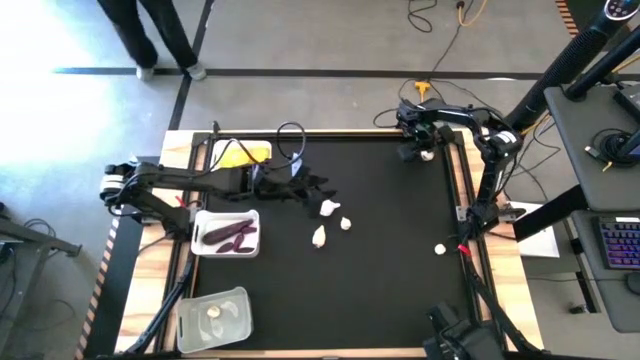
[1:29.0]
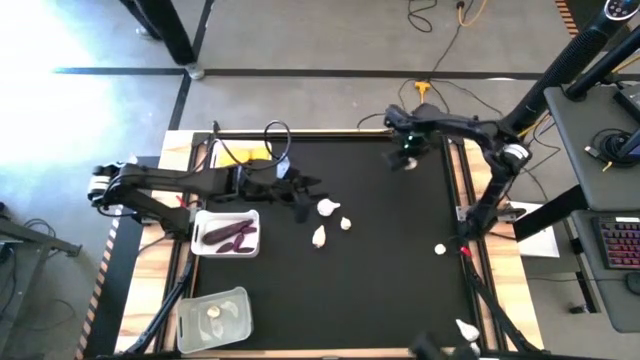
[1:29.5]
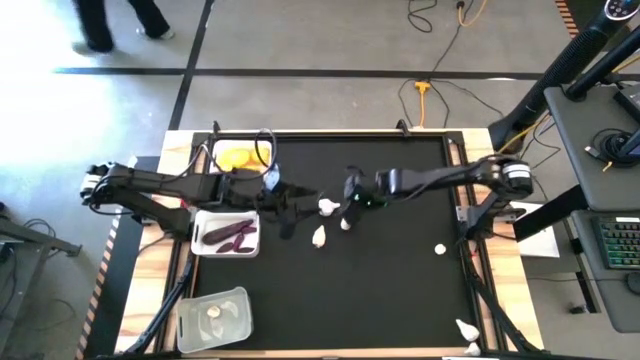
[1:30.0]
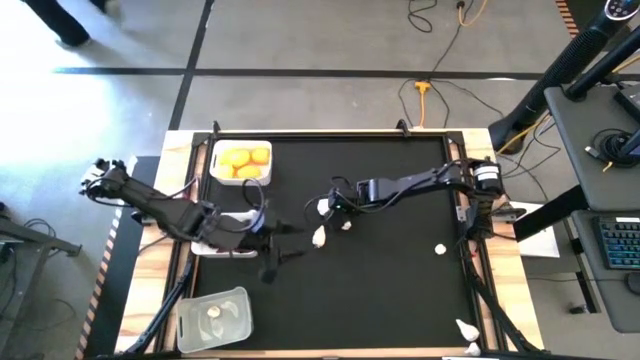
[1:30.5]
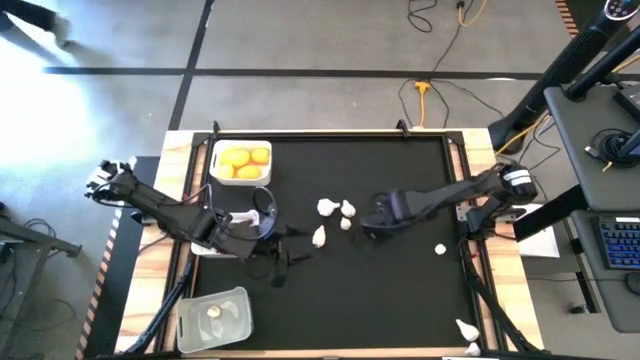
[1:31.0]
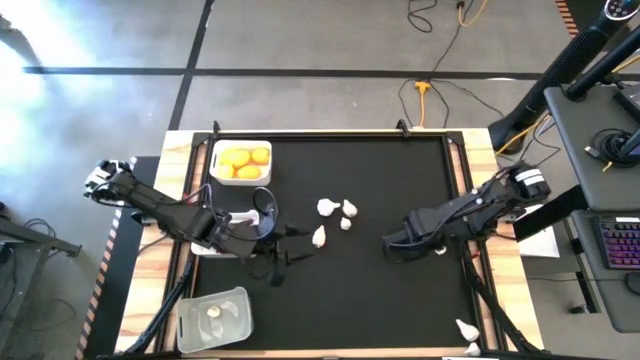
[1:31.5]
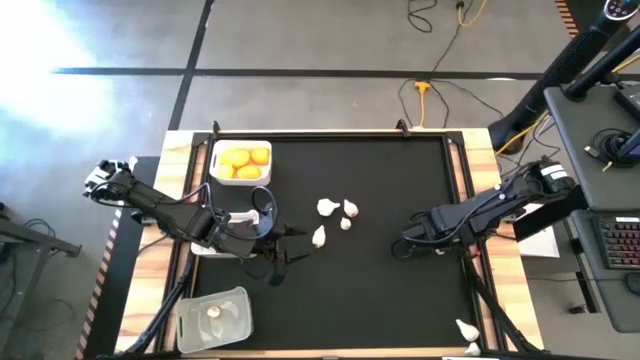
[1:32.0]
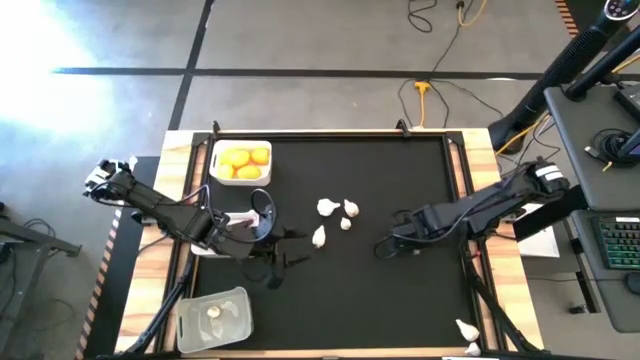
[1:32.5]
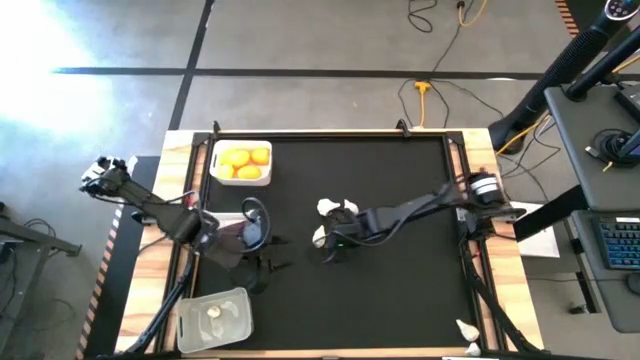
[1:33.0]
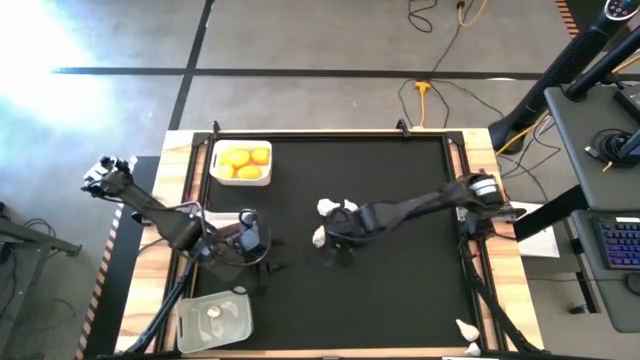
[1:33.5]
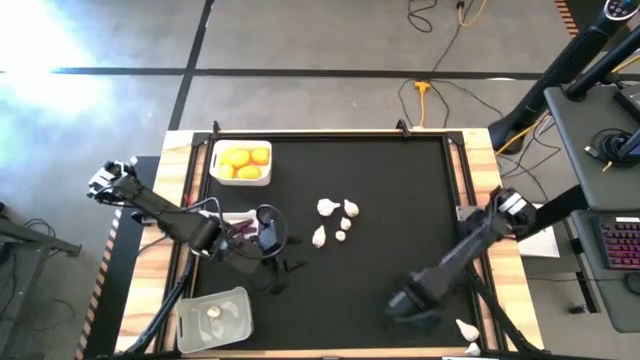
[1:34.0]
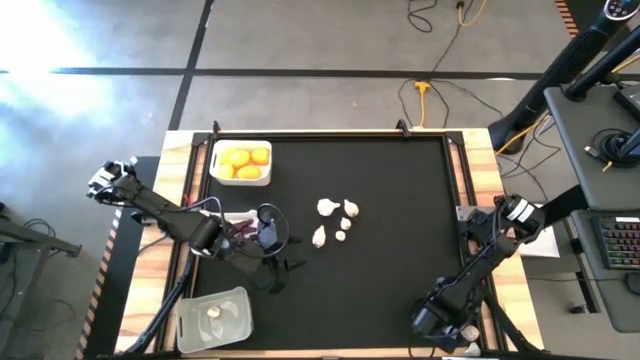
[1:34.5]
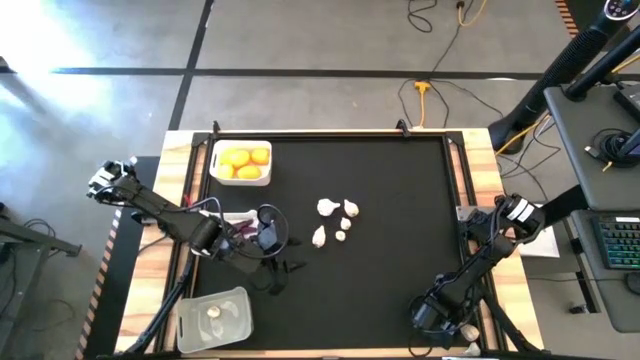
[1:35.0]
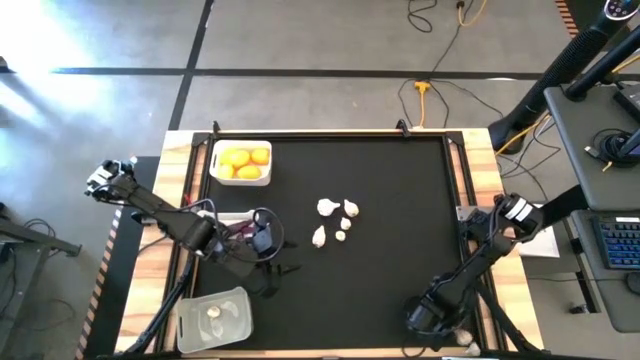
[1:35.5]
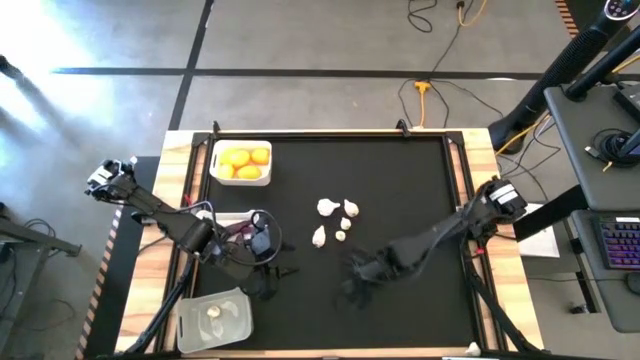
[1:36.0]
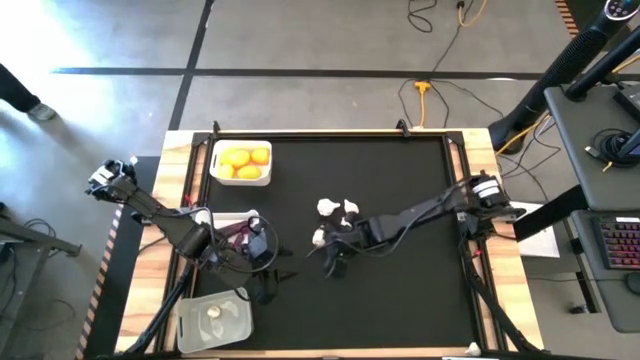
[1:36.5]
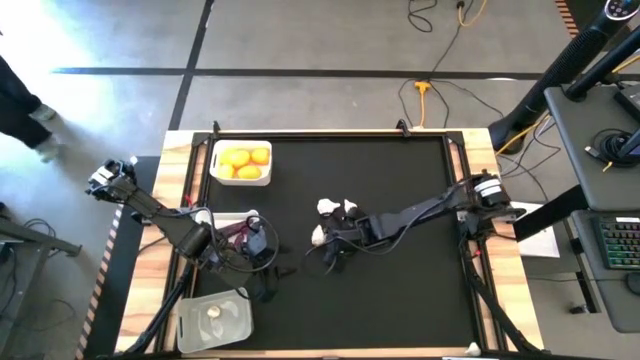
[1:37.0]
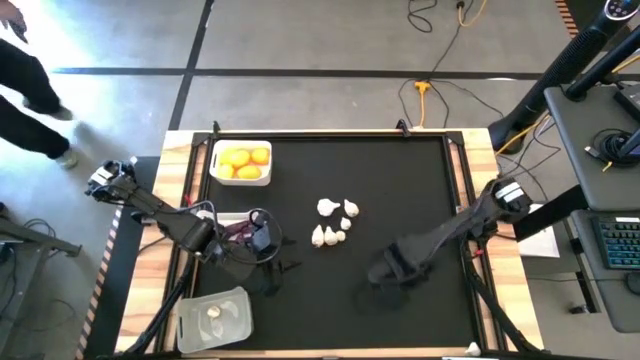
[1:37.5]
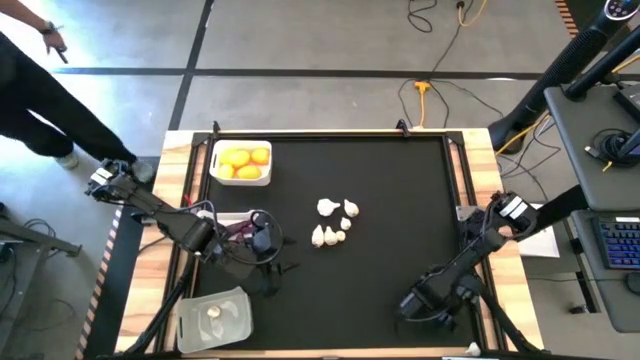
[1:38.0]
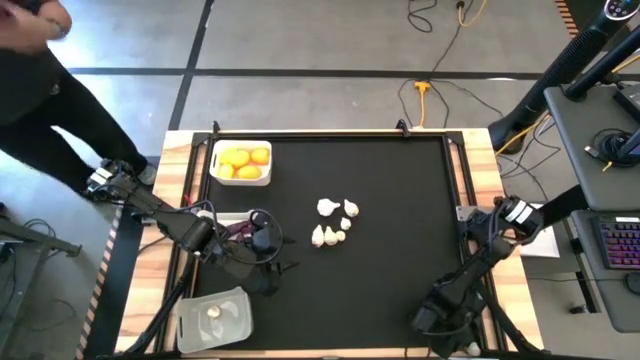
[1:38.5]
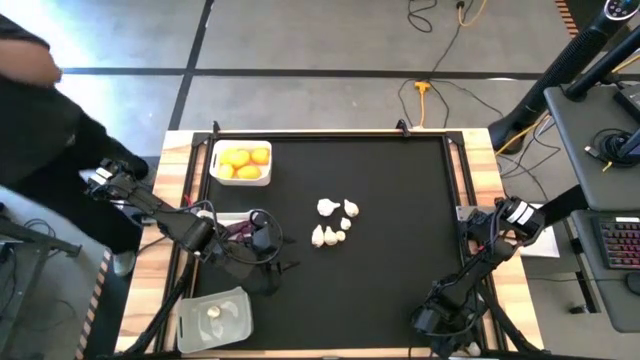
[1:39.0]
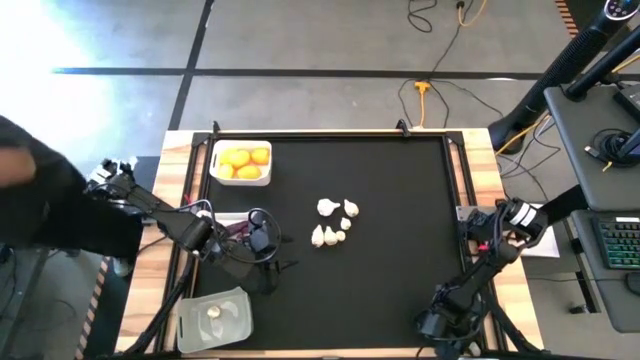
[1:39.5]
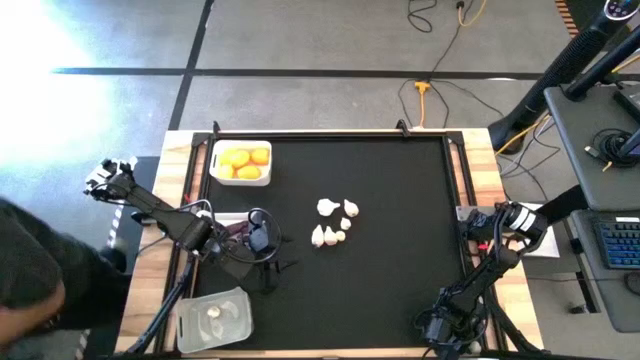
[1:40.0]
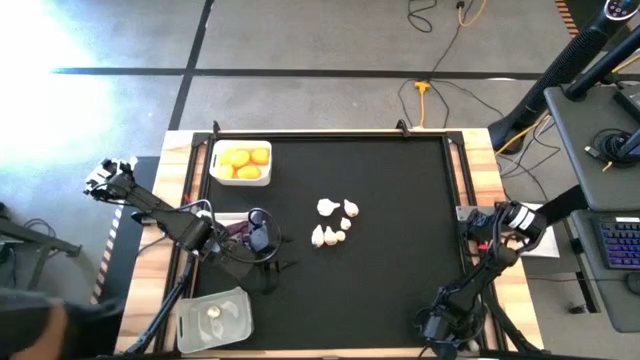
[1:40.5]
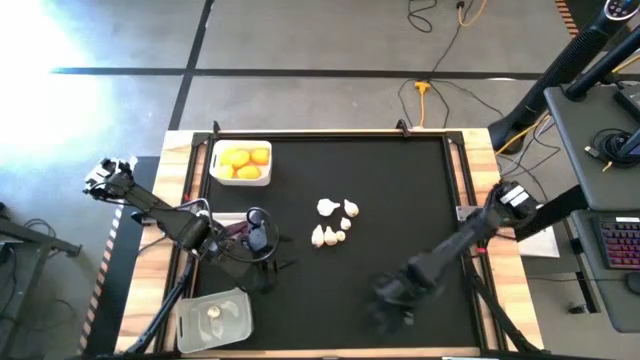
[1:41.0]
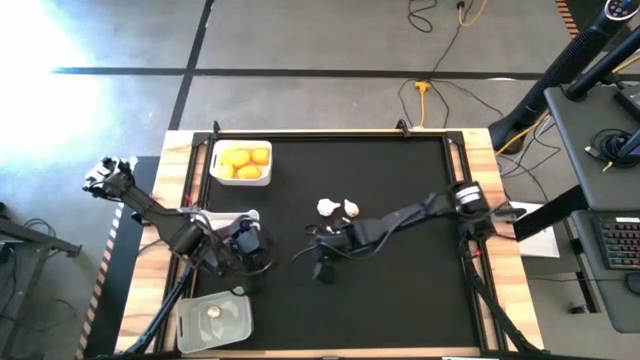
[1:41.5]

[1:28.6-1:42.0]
Task: Sort produce into baskets
Move the garlic to the center of the table

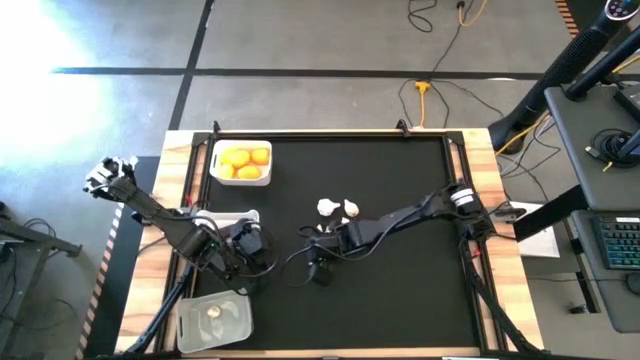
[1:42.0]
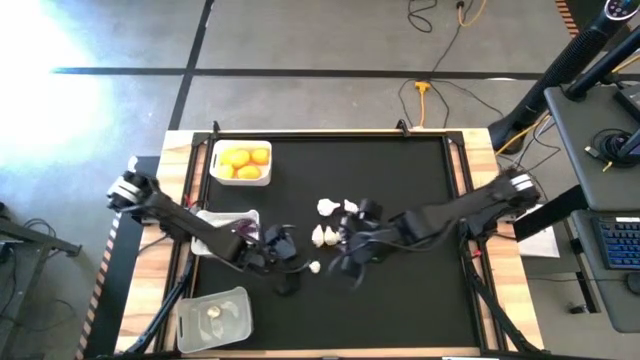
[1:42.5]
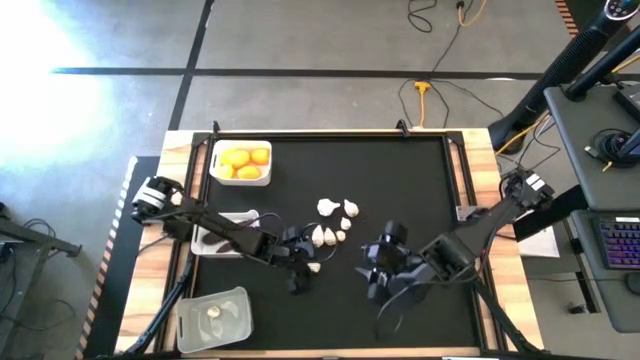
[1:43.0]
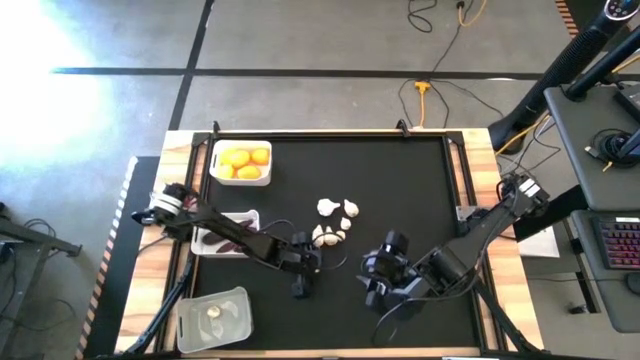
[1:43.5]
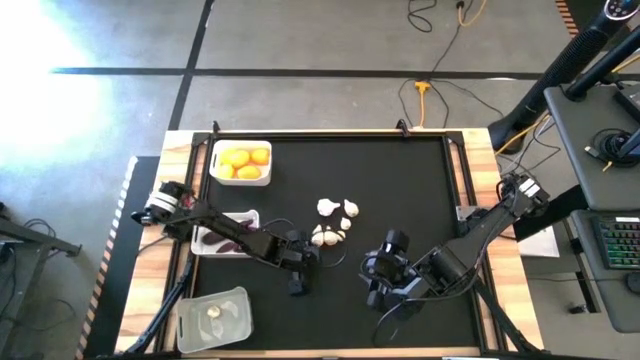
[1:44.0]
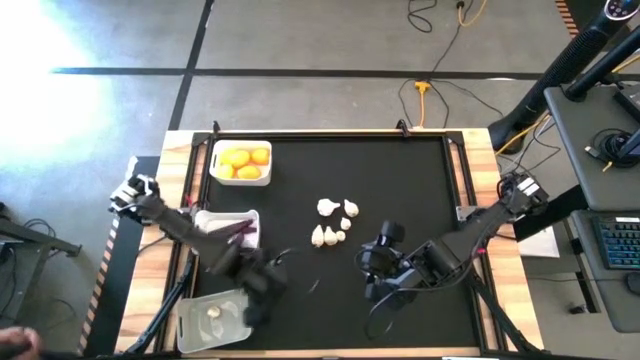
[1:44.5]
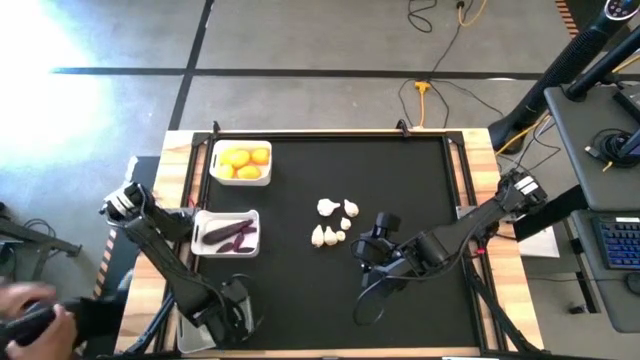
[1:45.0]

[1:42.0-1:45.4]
Put the garlic into the gray bin

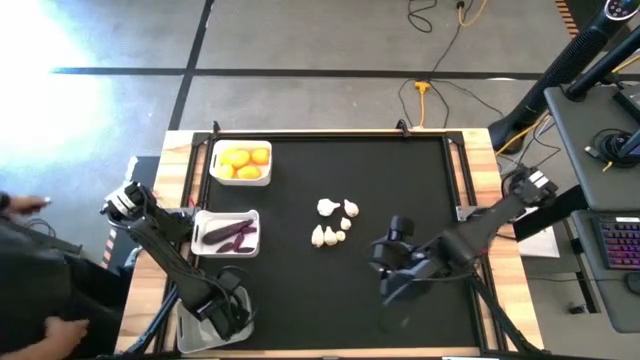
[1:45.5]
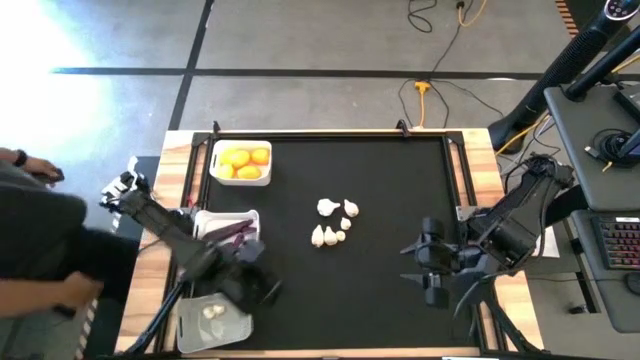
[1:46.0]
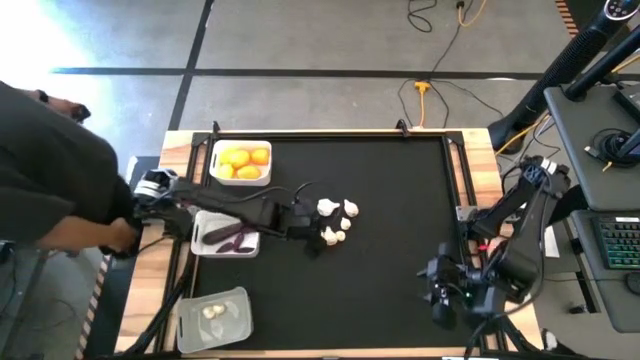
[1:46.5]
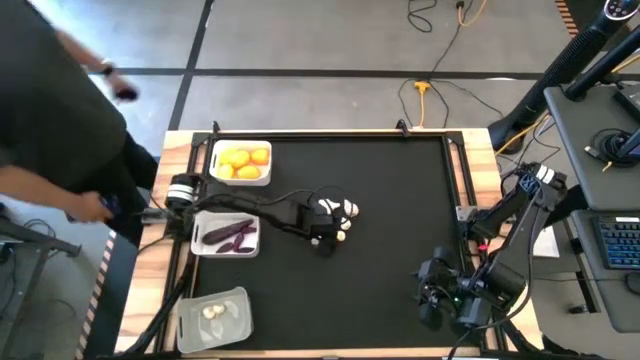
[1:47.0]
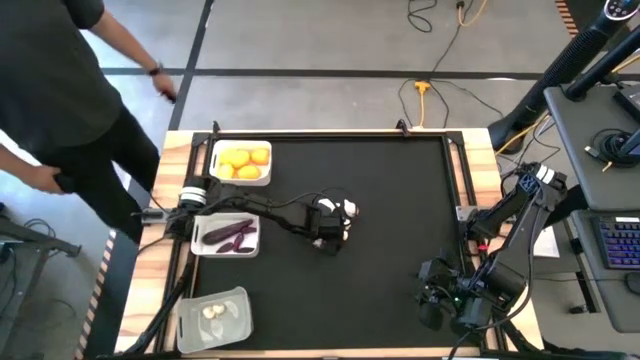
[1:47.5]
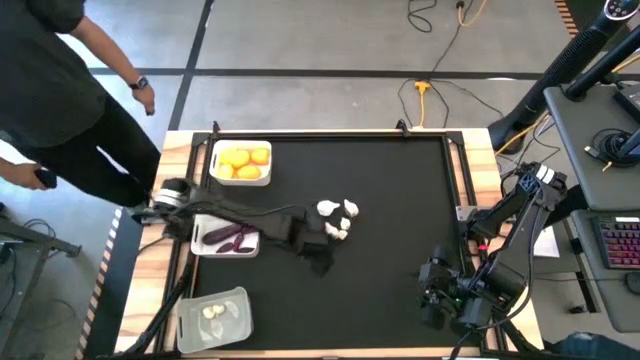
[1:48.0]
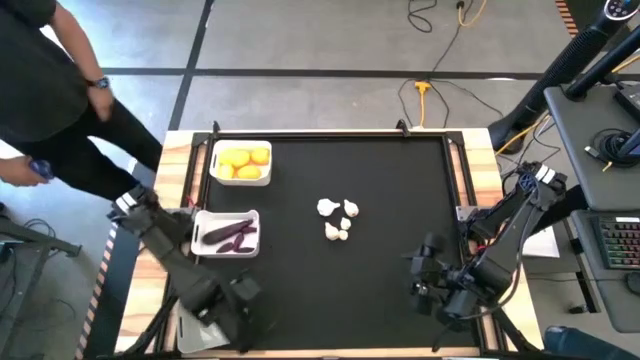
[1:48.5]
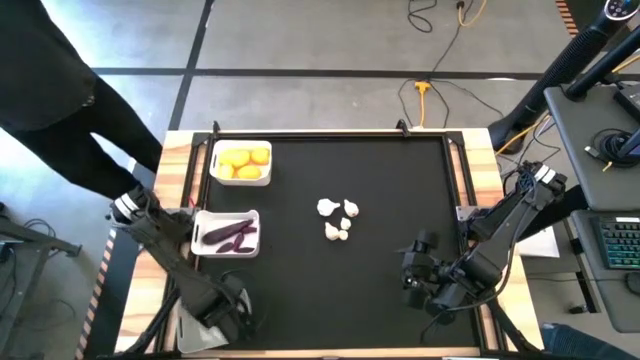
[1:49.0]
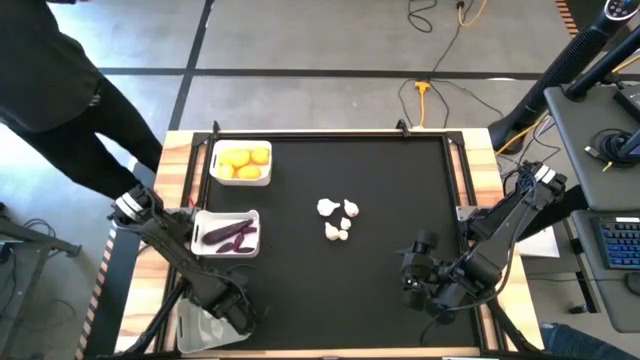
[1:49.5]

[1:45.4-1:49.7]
Put the garlic into the gray bin
